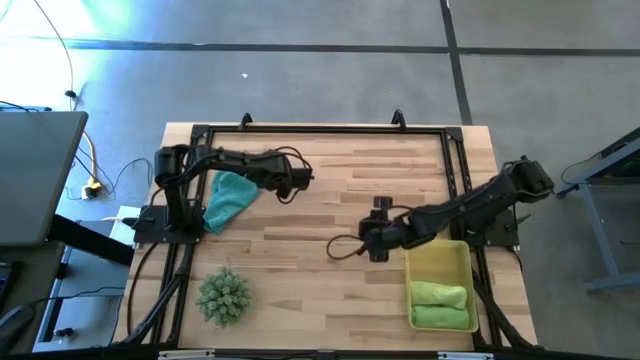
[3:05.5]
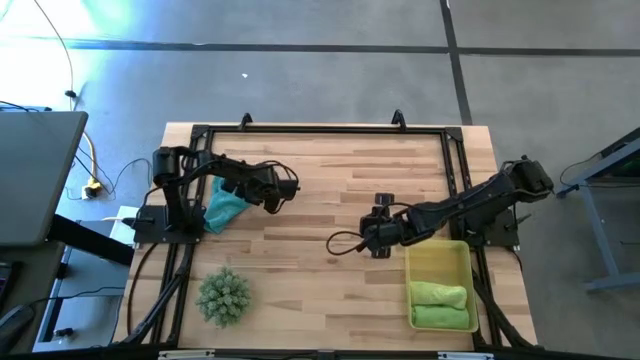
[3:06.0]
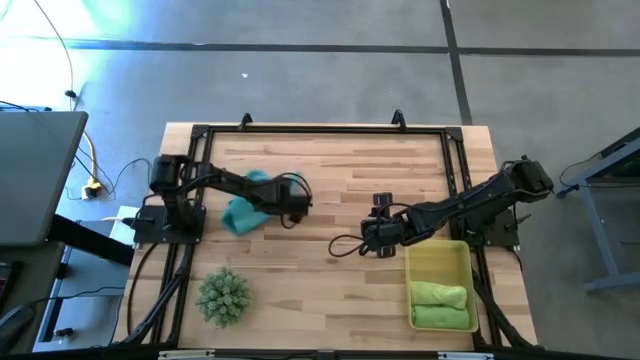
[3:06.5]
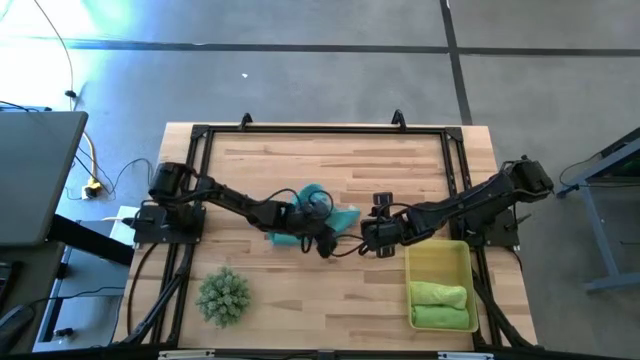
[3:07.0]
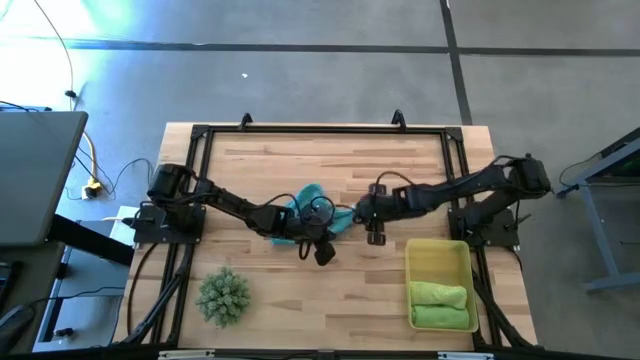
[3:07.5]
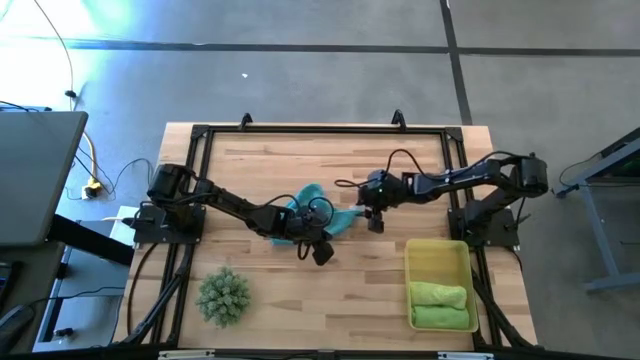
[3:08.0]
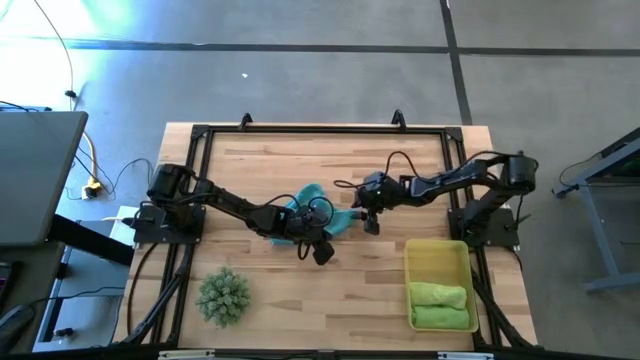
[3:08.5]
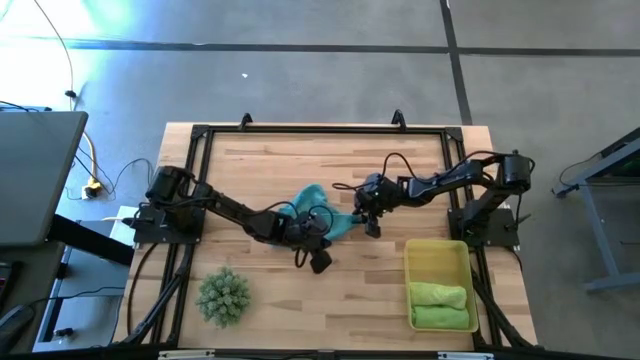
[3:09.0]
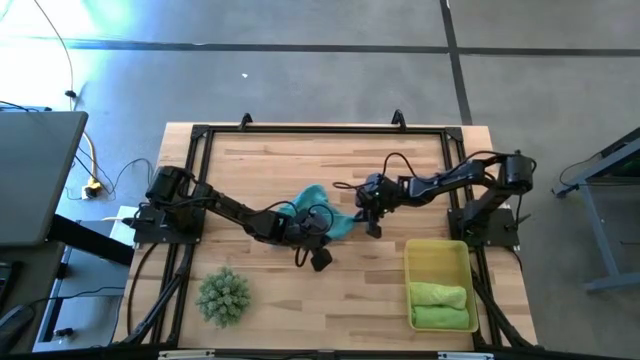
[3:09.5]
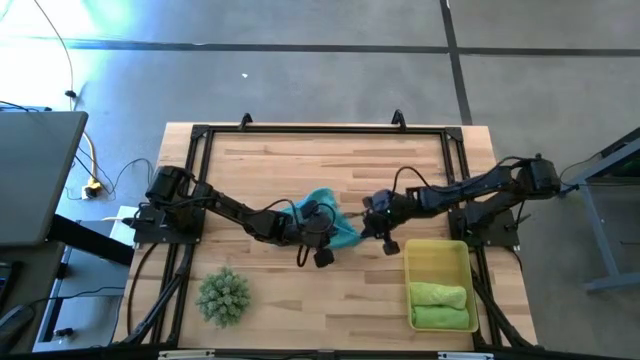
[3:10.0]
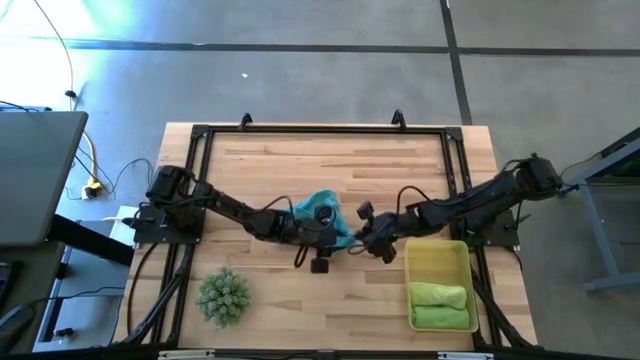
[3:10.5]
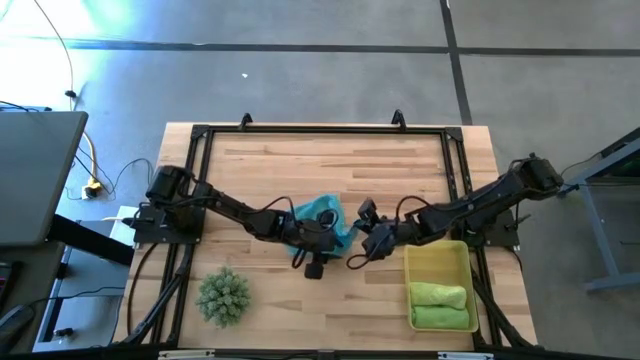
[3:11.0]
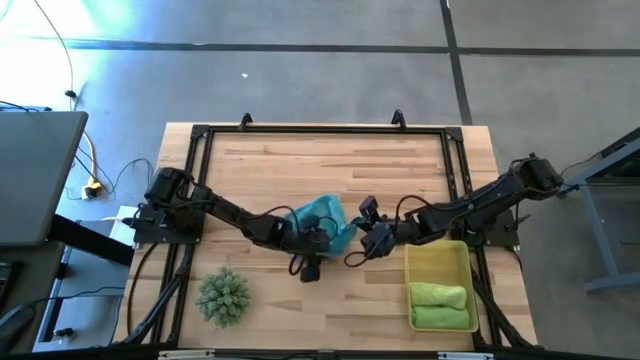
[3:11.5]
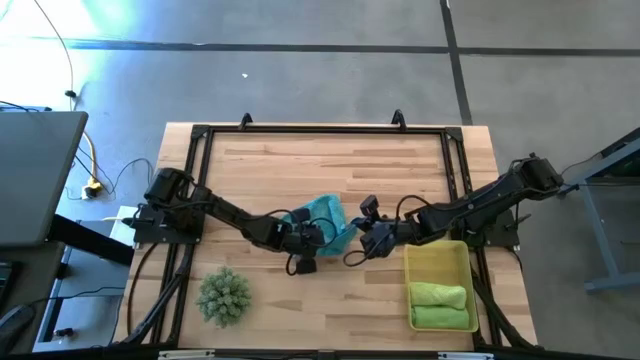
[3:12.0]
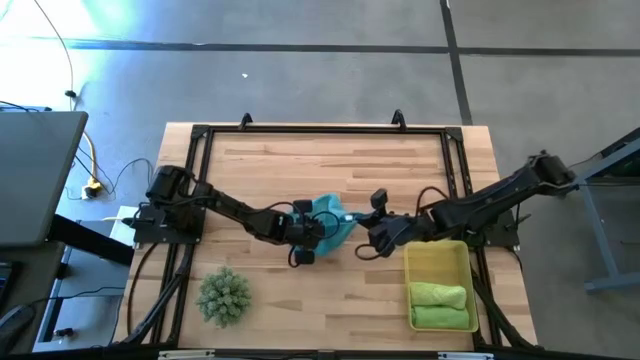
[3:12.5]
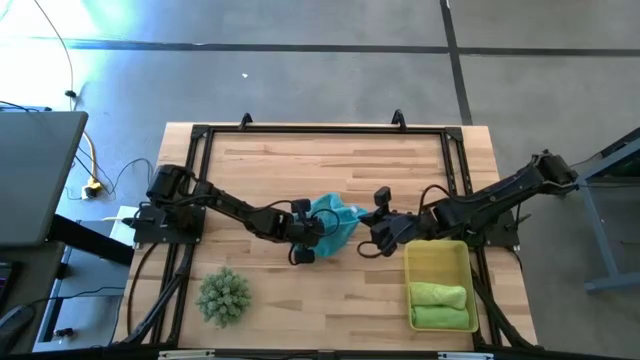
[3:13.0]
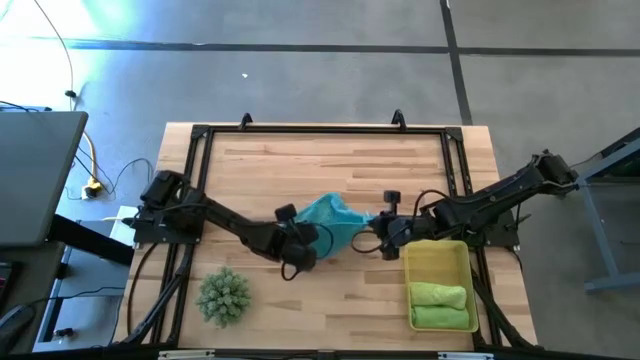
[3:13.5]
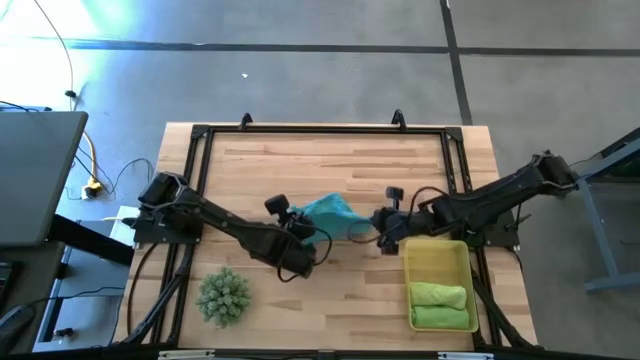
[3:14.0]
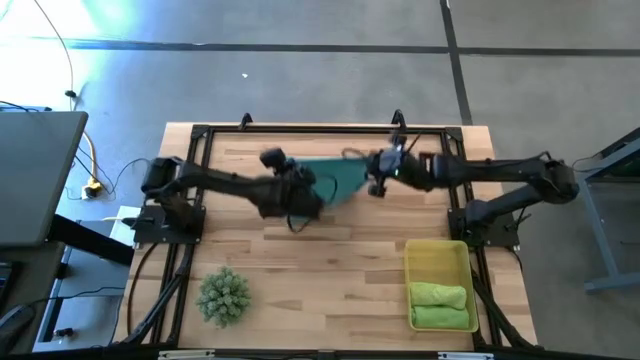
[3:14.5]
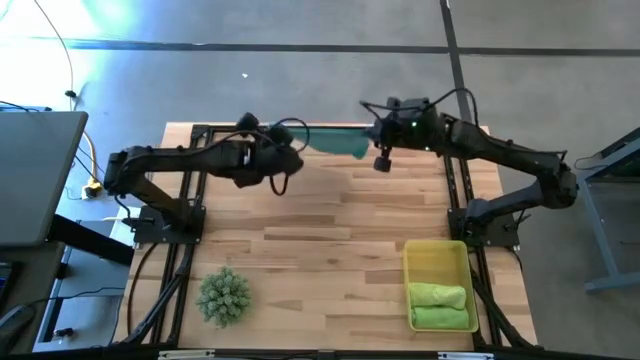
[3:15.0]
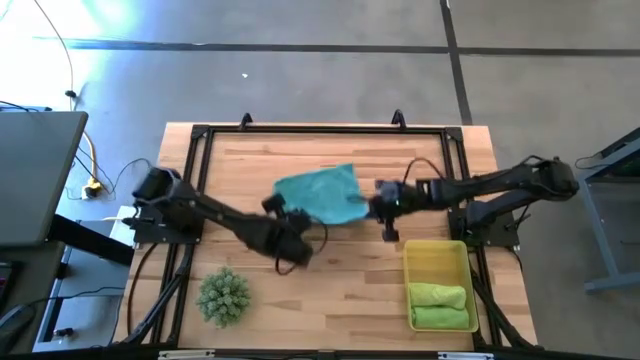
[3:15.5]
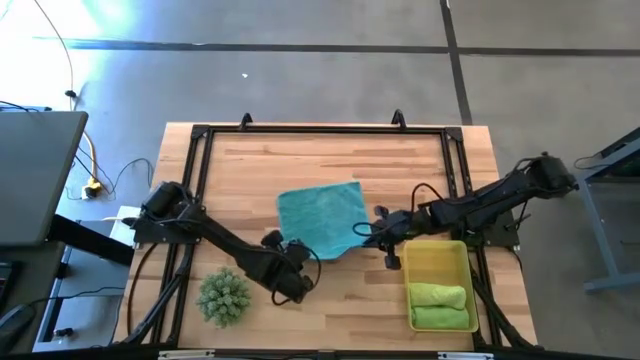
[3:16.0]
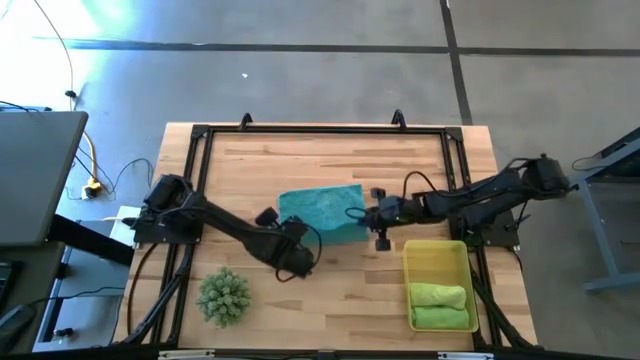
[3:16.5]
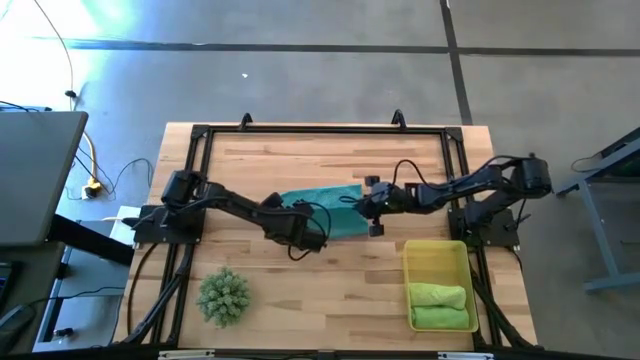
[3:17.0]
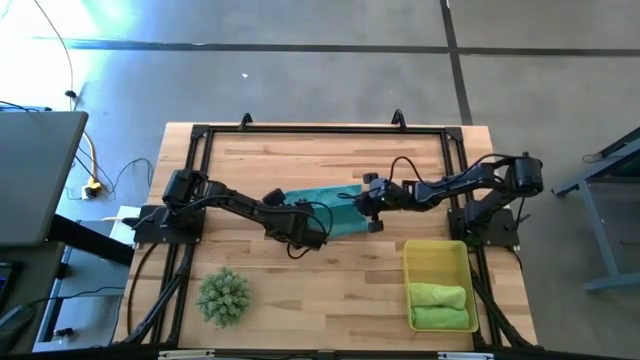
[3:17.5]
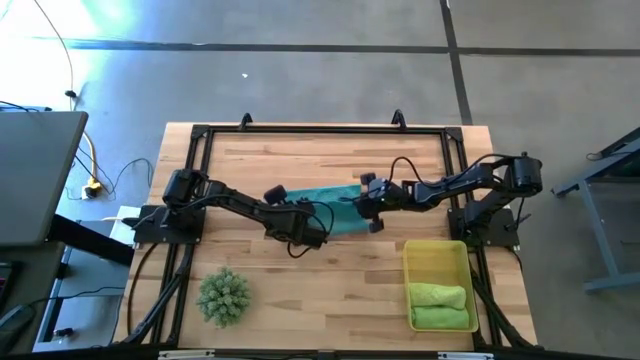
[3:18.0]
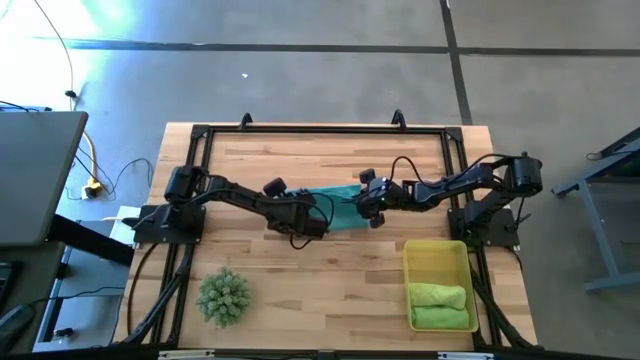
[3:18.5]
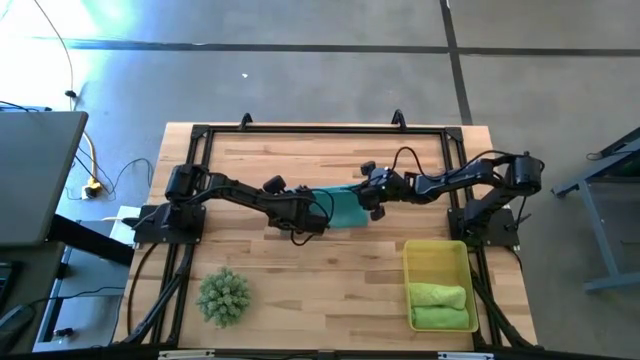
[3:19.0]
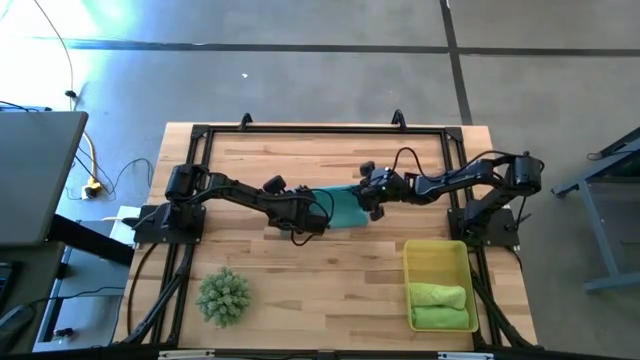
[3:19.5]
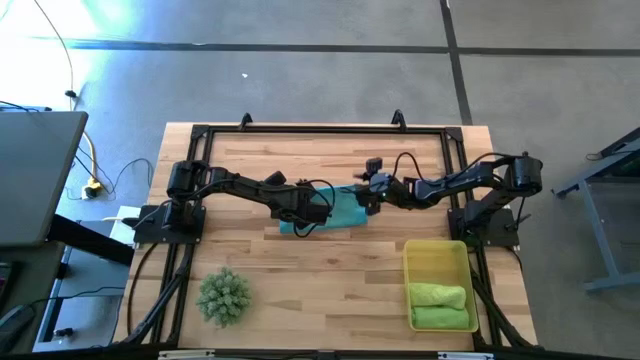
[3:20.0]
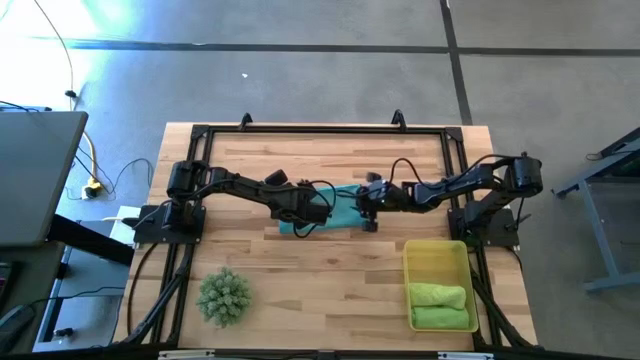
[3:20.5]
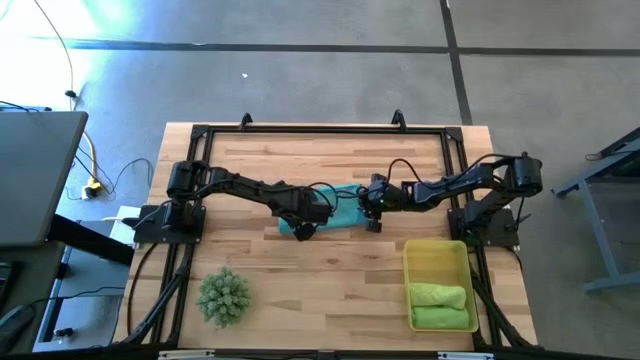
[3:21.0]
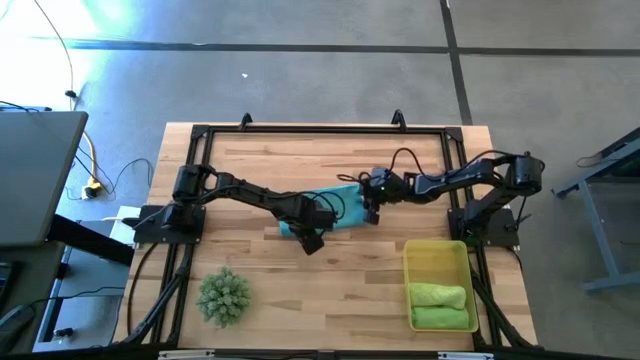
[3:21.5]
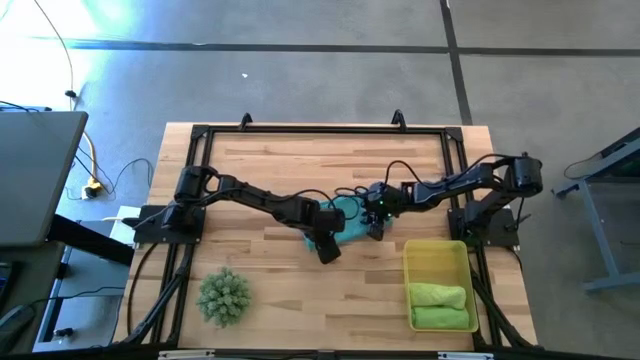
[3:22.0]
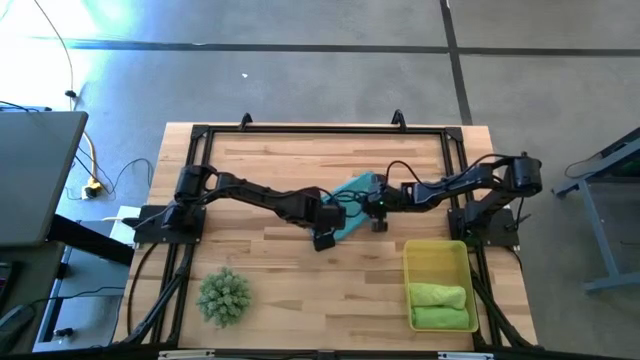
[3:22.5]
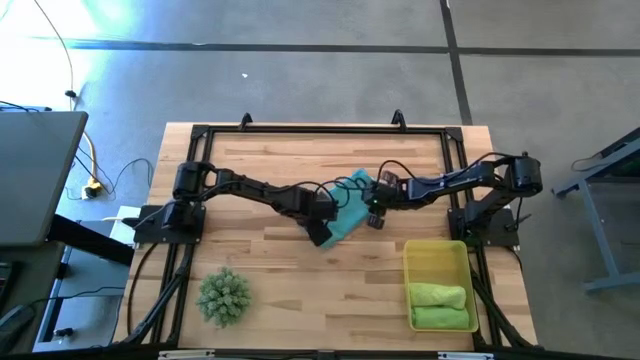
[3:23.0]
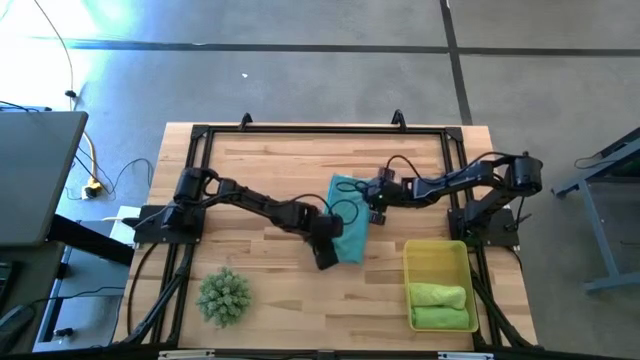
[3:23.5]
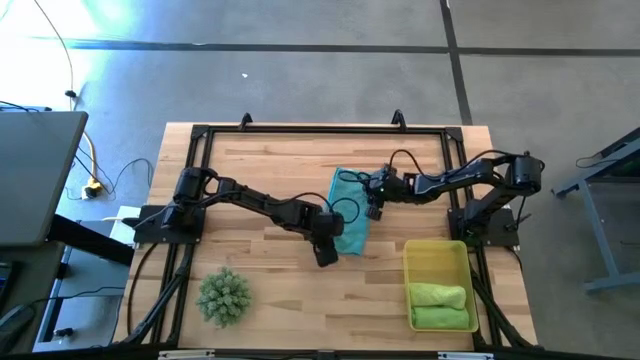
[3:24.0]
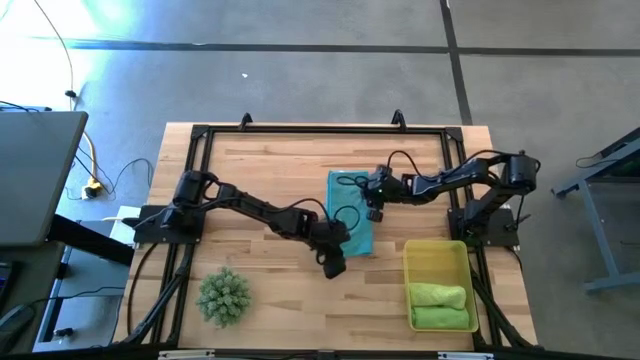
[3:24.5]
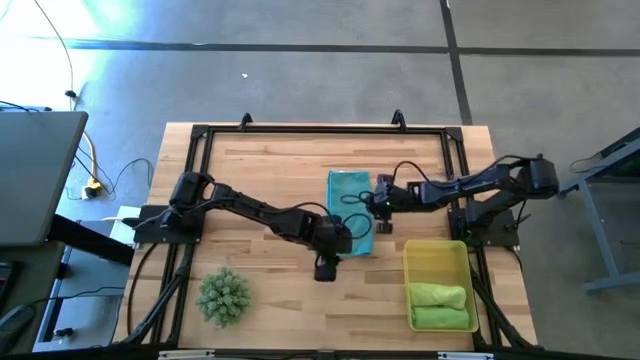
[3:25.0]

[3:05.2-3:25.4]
Task: Roll microfiber towels into tight, uniform cylinder then place into a basket
Fold the blue microfiber cloth
